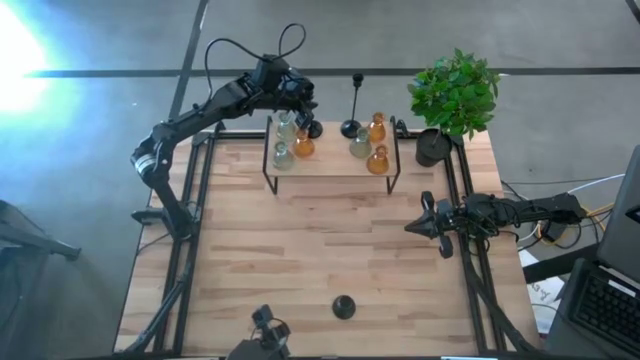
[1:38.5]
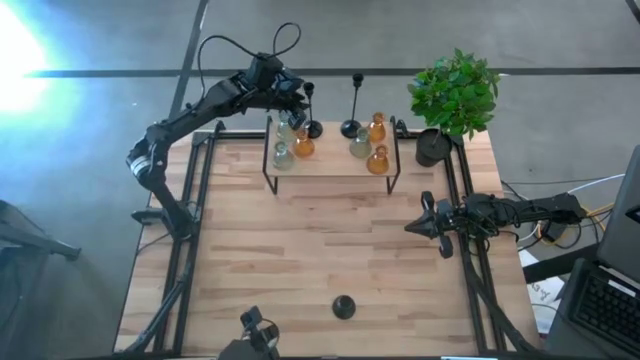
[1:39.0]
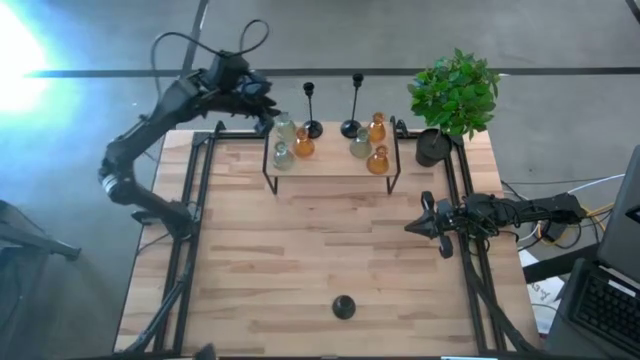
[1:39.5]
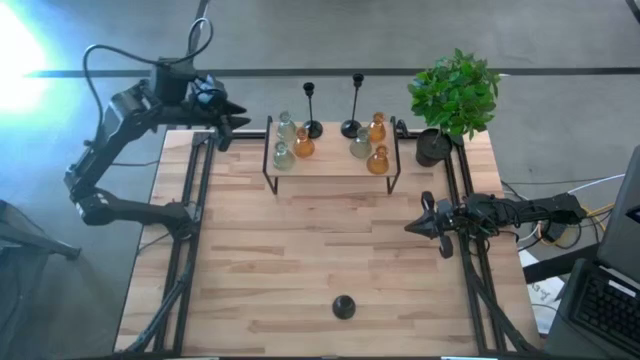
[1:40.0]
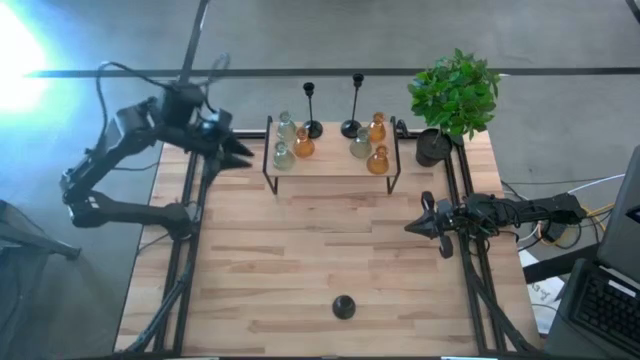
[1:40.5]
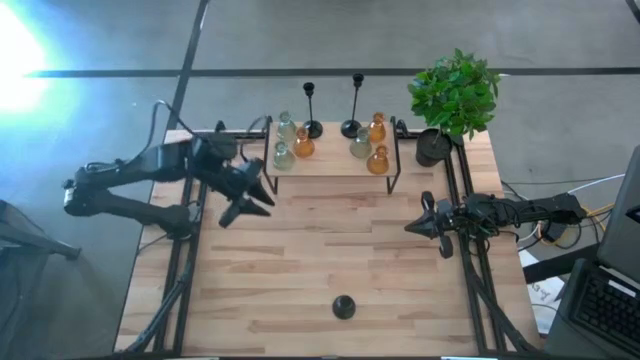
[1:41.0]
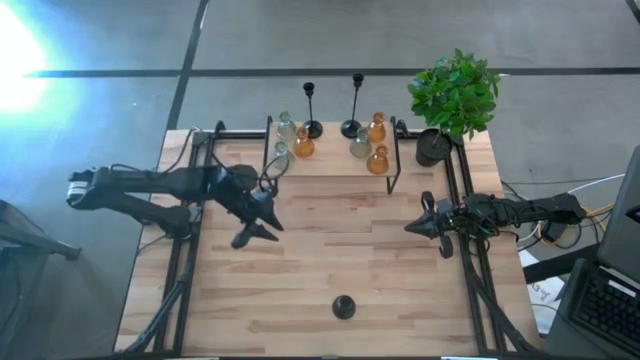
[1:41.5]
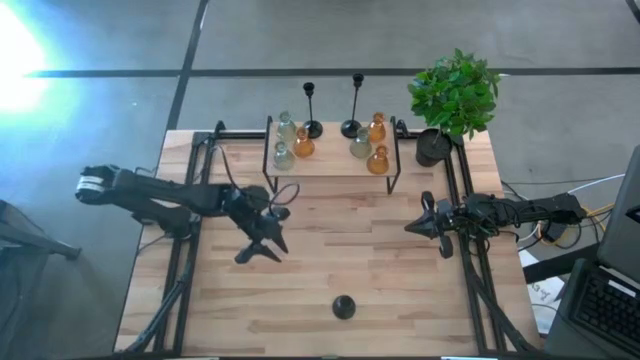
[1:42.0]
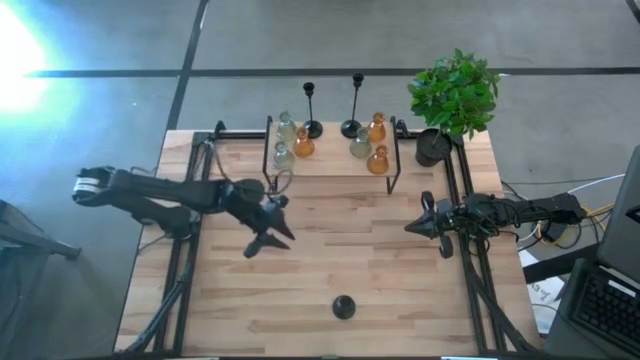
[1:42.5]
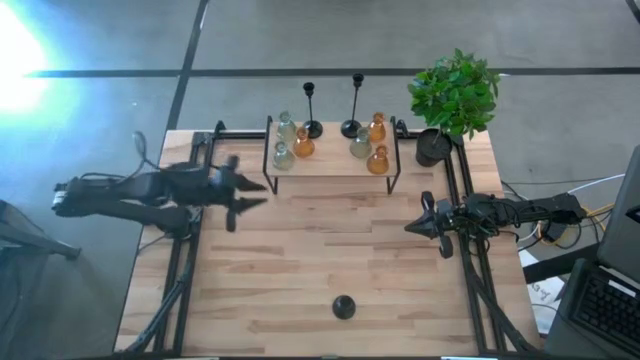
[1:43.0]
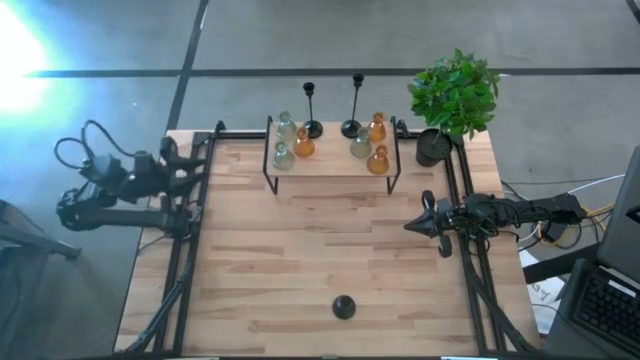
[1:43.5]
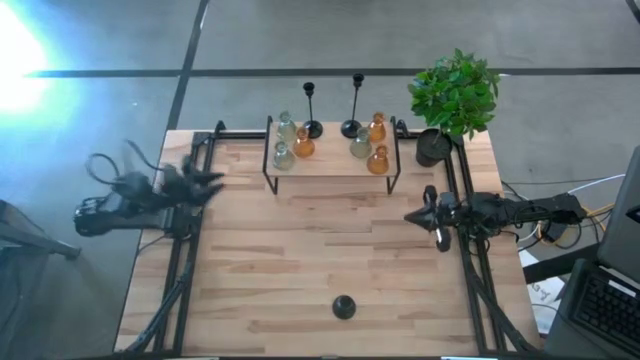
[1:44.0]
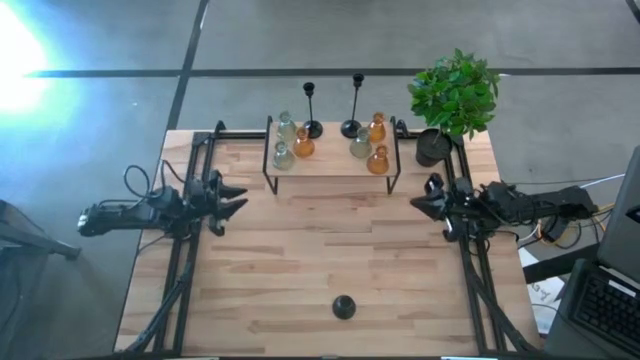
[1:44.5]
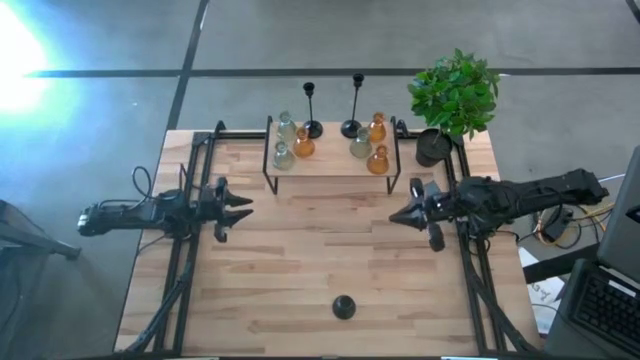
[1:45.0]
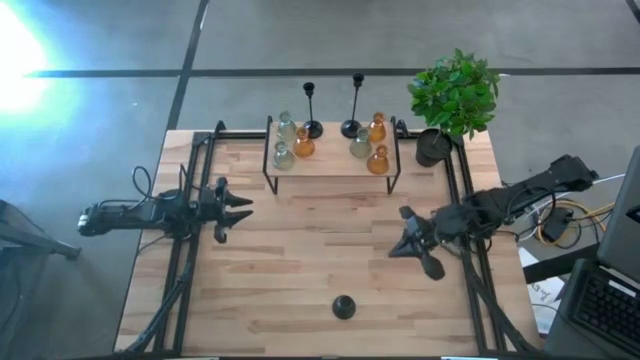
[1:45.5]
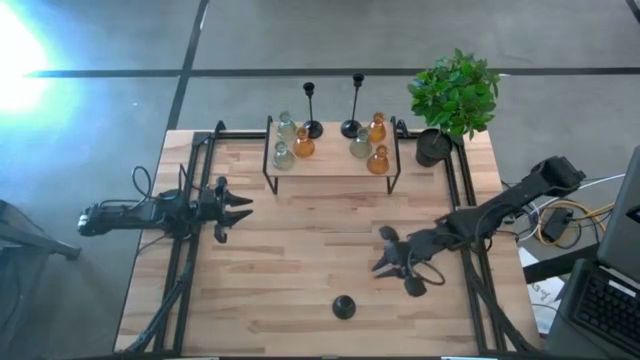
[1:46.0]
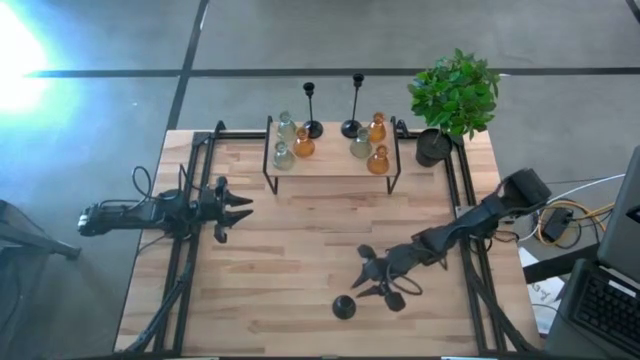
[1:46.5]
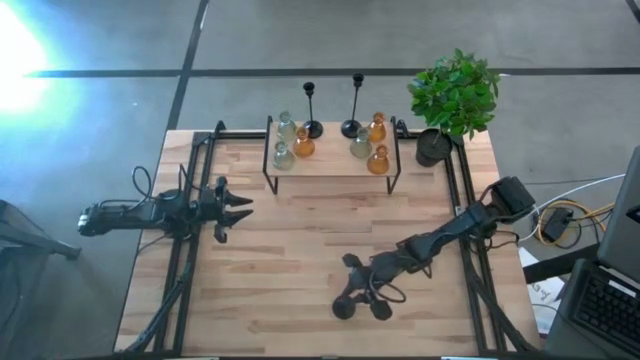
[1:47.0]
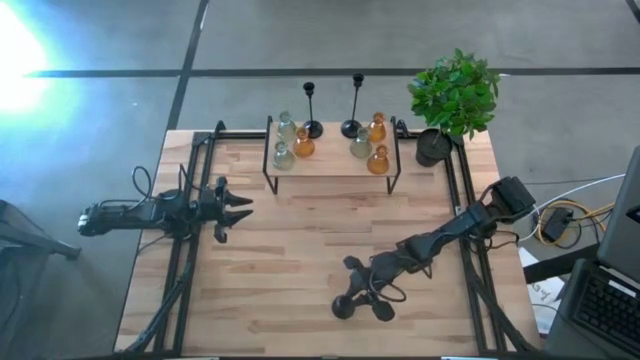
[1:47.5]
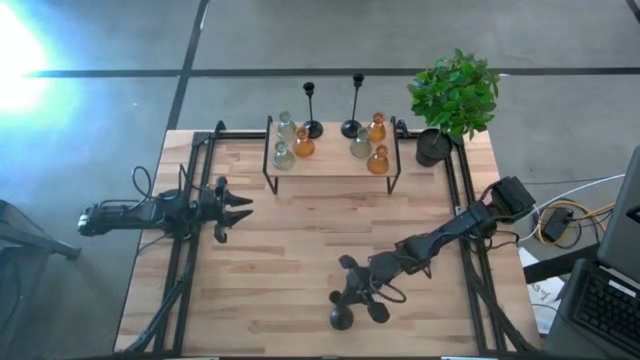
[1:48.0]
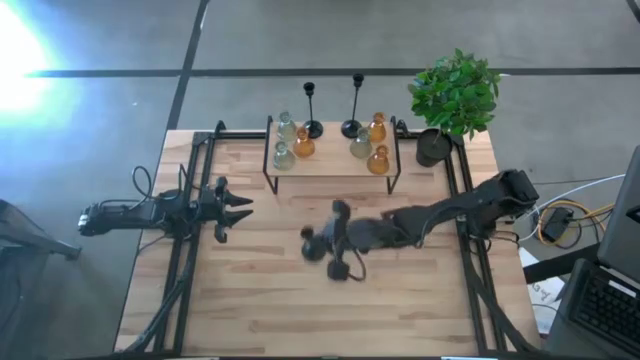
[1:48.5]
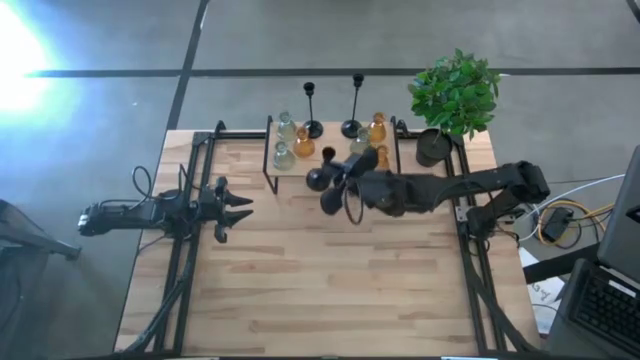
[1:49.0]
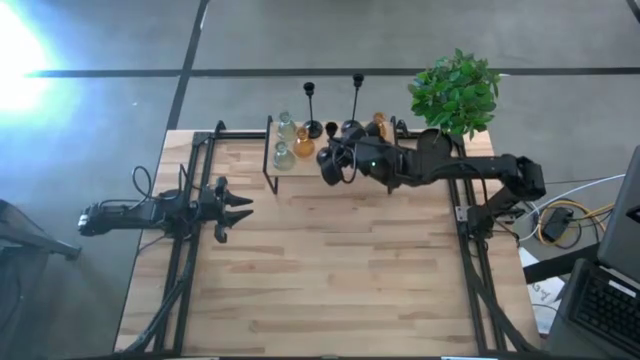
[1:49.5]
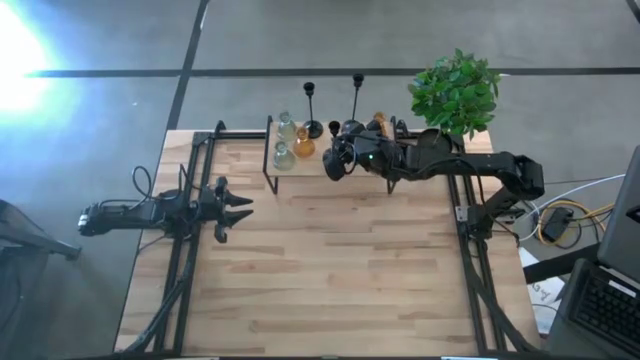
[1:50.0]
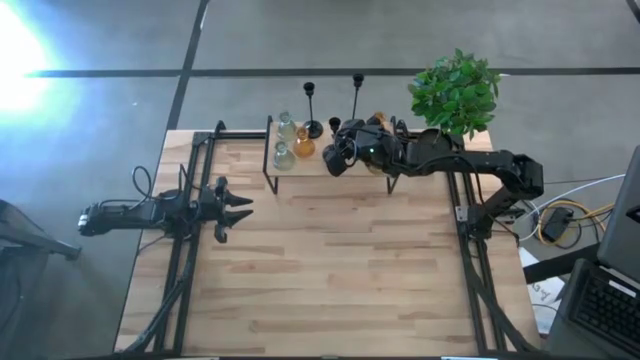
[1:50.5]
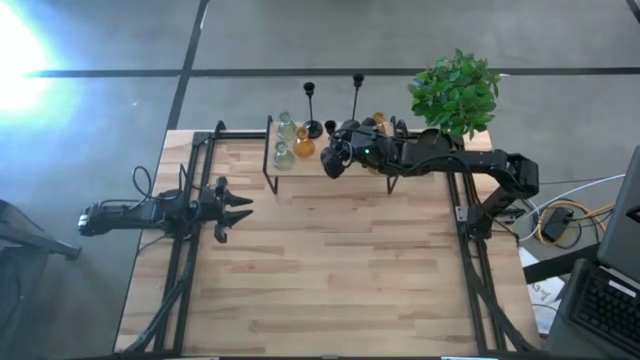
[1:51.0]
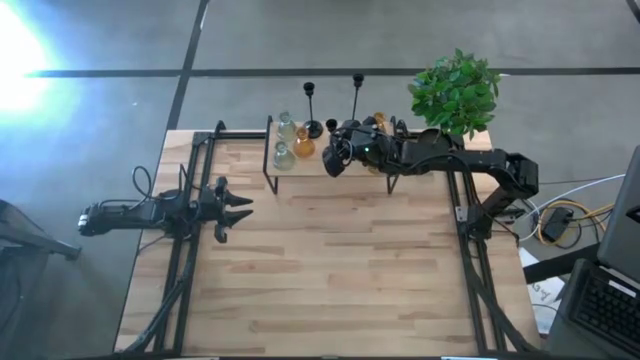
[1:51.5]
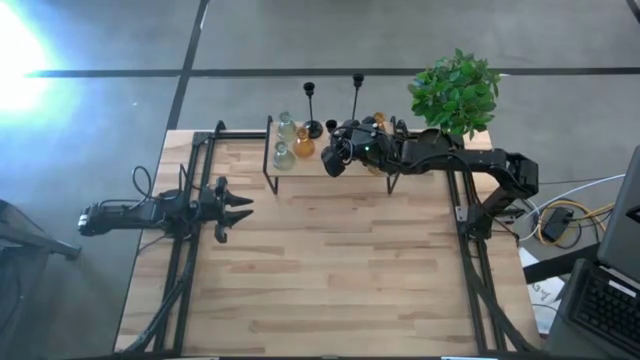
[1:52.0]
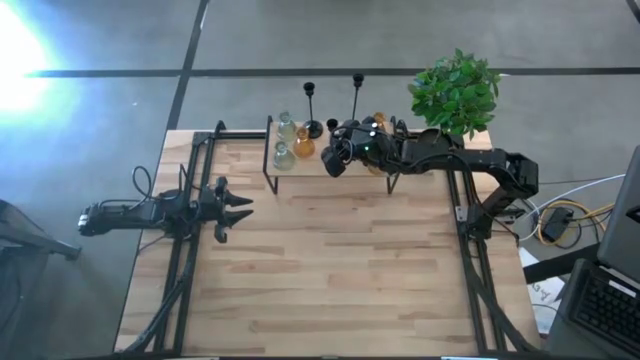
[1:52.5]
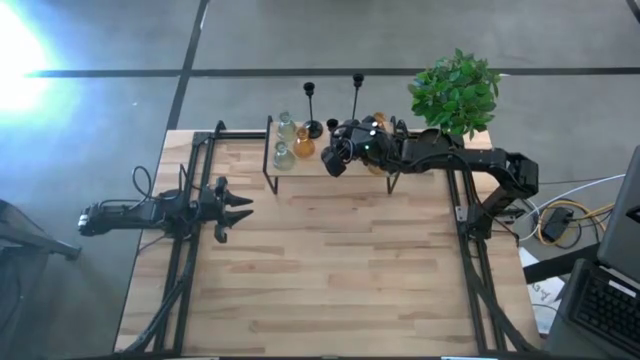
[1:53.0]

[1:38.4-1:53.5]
Task: Pick & Place candle stick holders
Put the black candle holder on the shelf

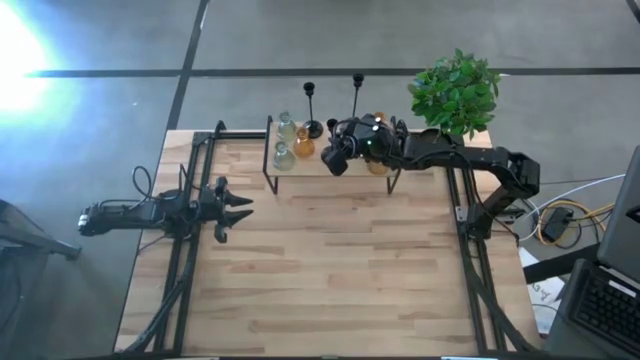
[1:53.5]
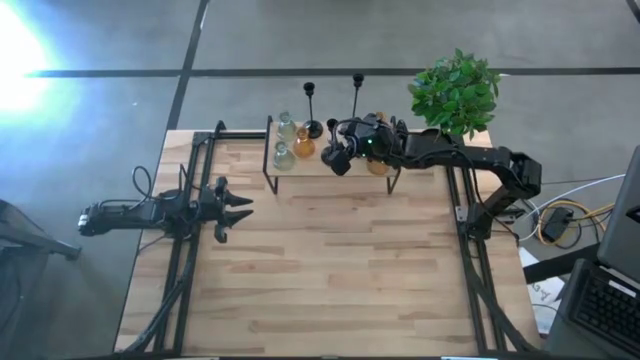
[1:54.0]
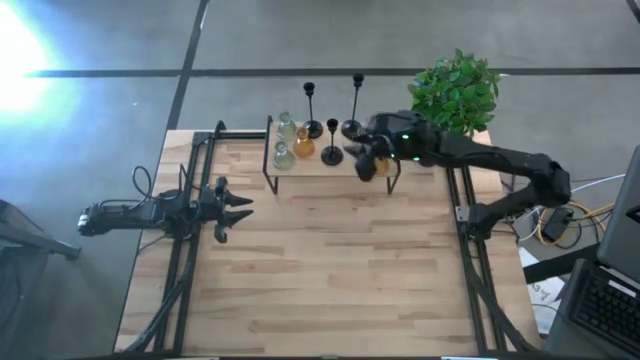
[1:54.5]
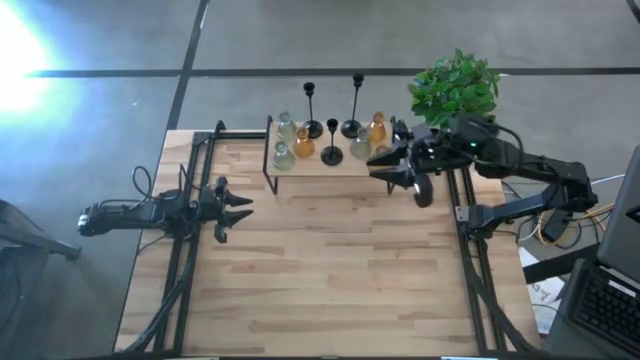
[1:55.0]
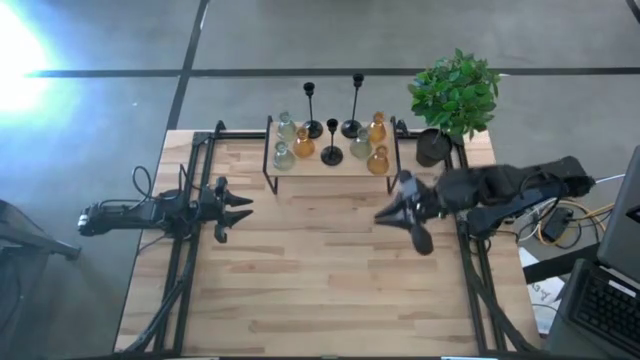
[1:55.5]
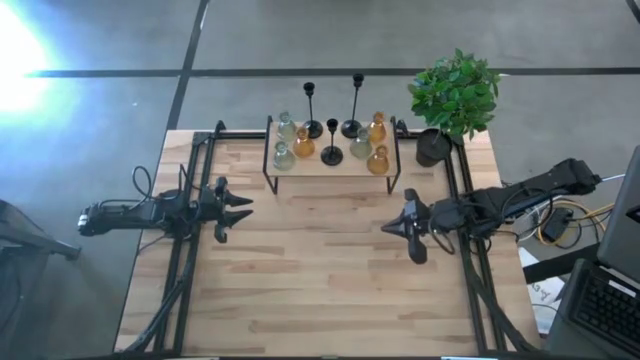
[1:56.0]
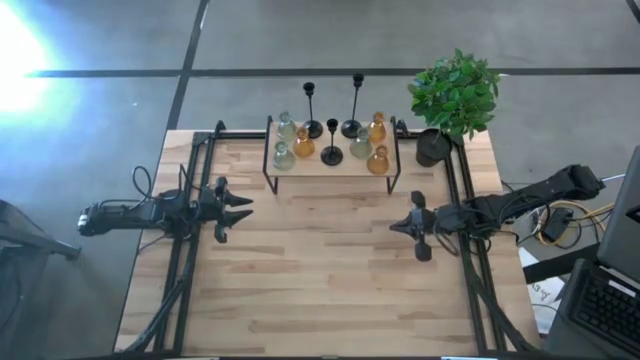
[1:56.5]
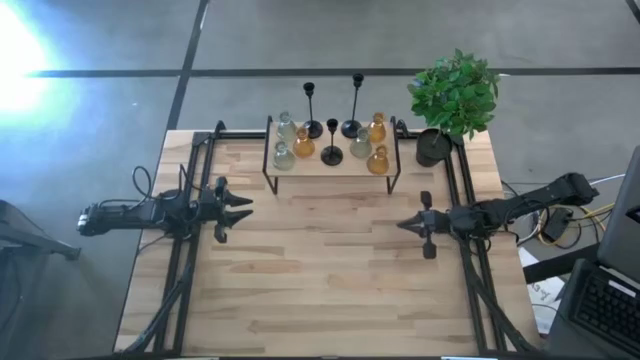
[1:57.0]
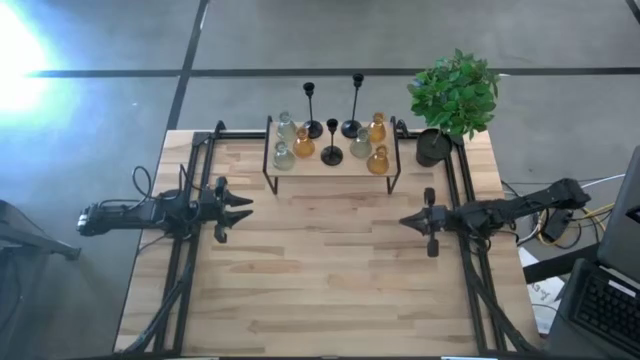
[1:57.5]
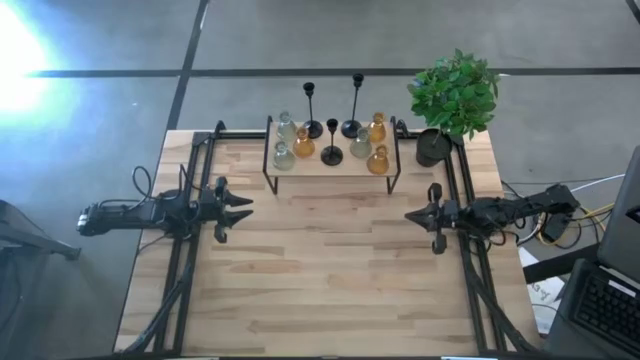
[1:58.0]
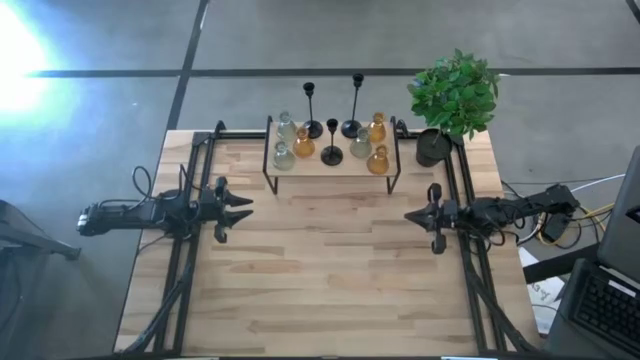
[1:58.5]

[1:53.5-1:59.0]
Return to Home Position
